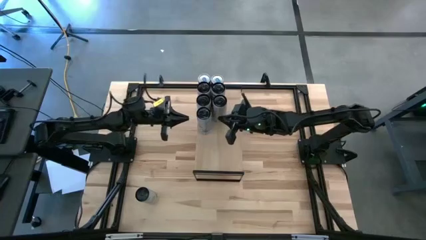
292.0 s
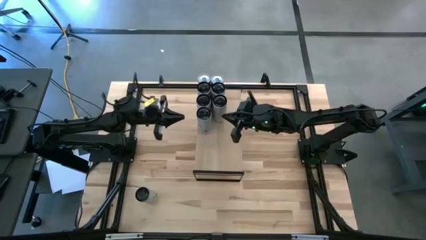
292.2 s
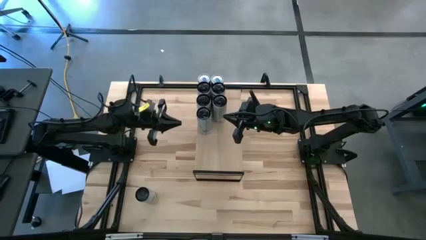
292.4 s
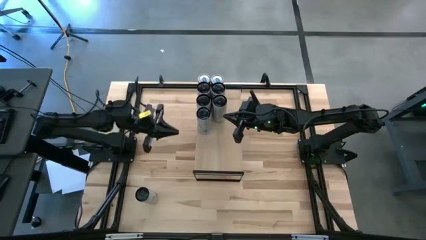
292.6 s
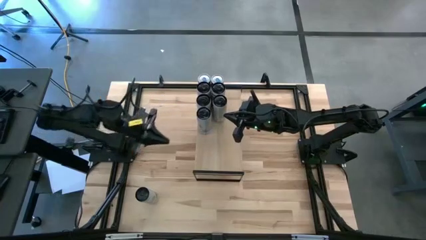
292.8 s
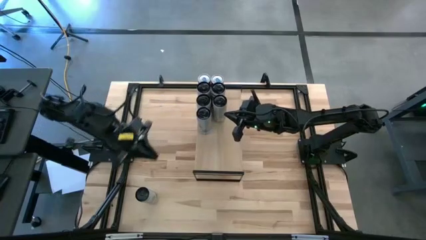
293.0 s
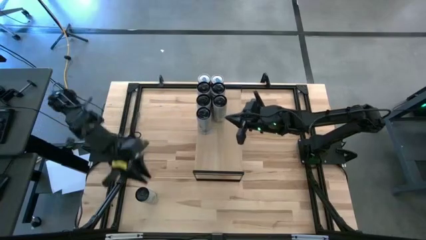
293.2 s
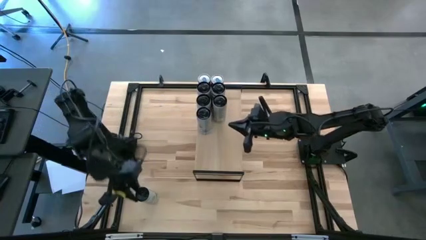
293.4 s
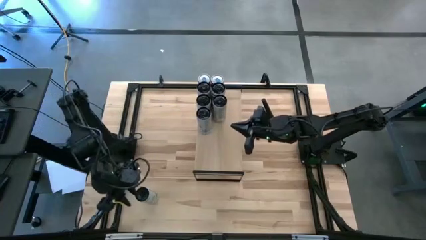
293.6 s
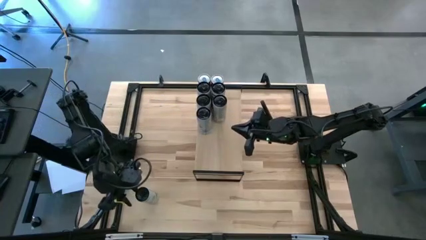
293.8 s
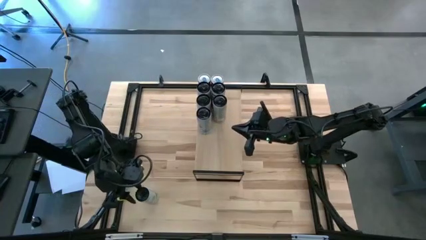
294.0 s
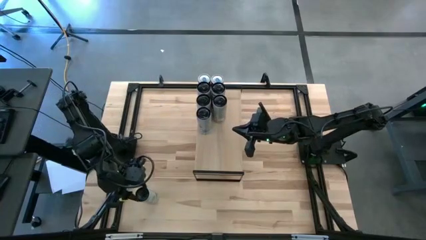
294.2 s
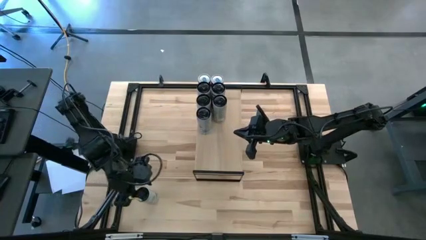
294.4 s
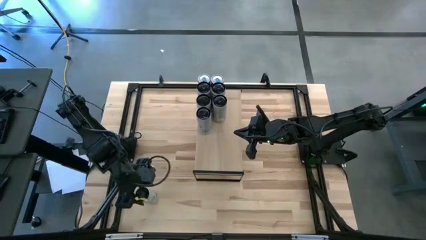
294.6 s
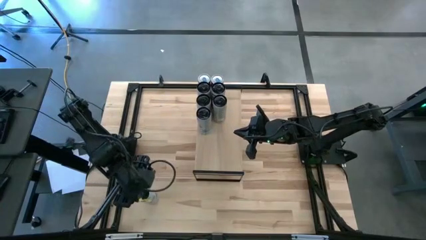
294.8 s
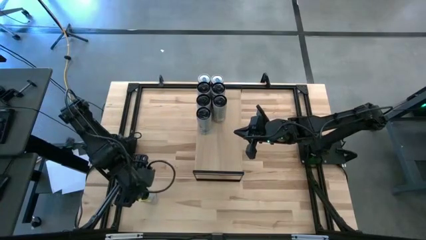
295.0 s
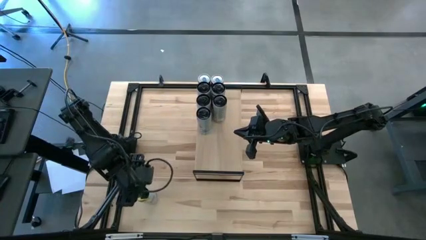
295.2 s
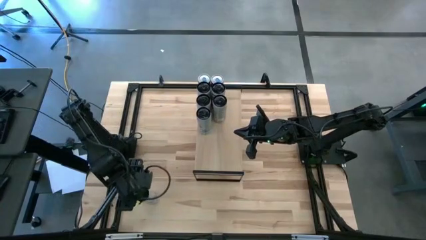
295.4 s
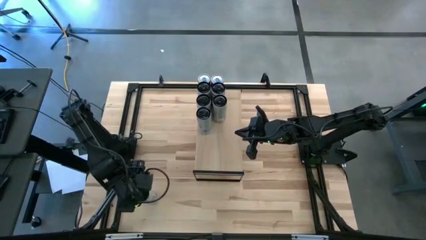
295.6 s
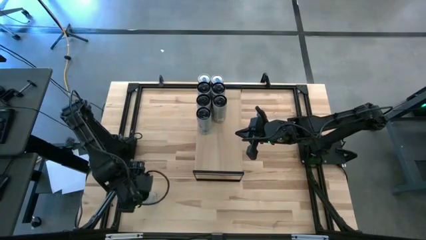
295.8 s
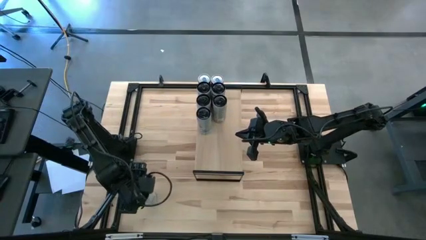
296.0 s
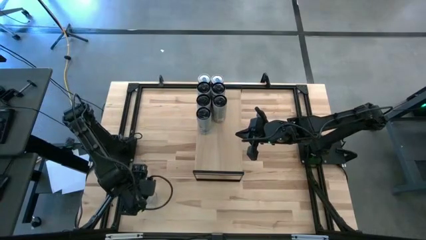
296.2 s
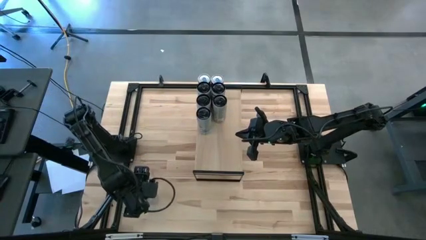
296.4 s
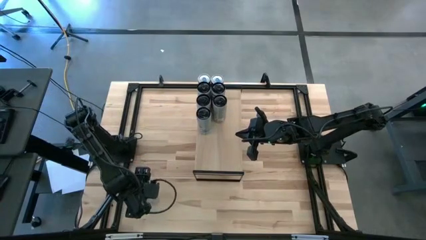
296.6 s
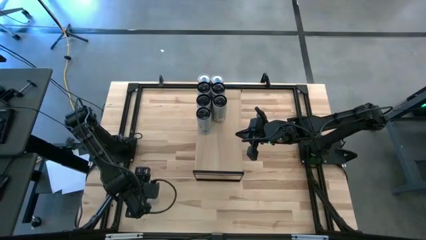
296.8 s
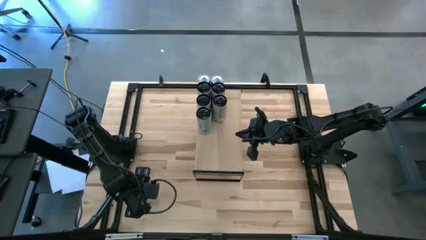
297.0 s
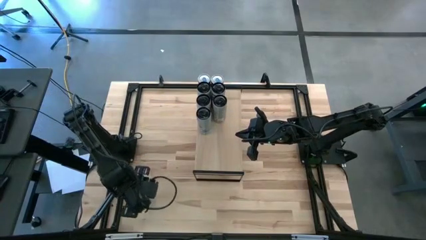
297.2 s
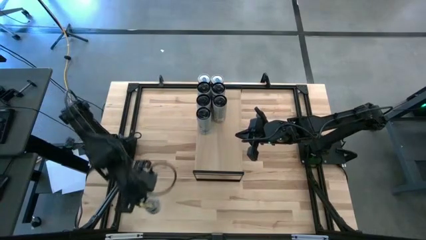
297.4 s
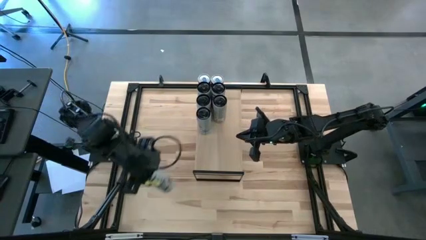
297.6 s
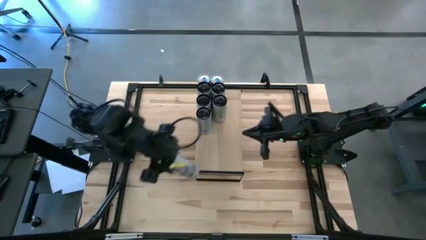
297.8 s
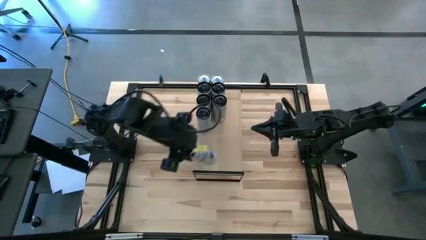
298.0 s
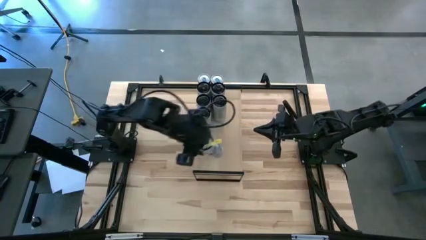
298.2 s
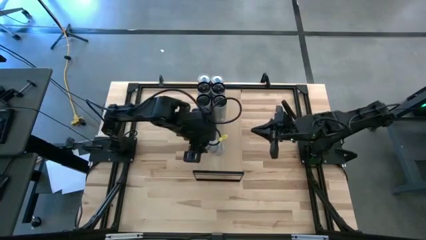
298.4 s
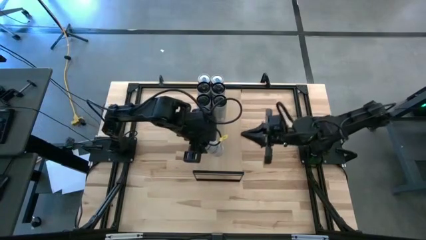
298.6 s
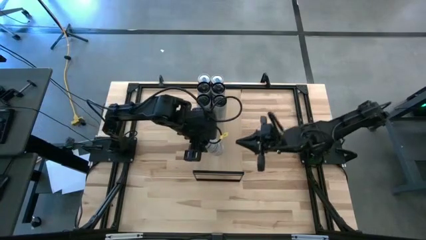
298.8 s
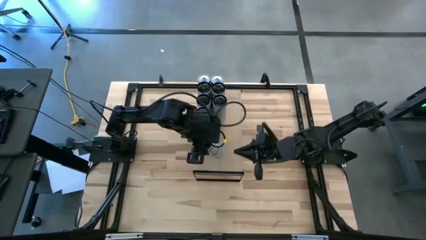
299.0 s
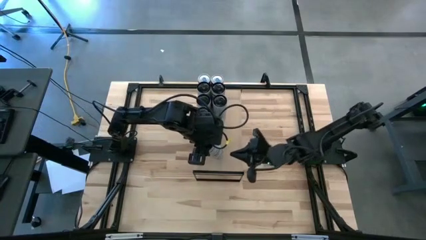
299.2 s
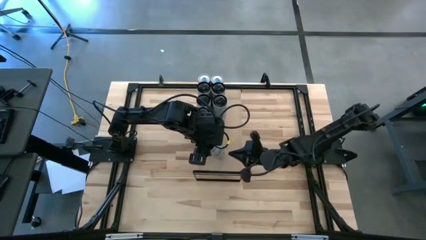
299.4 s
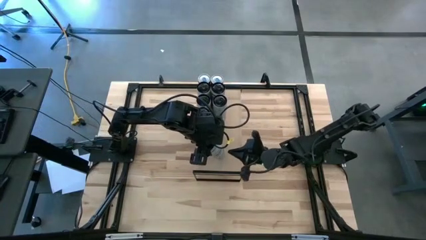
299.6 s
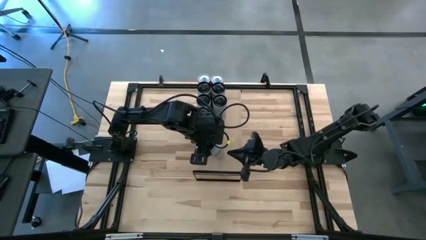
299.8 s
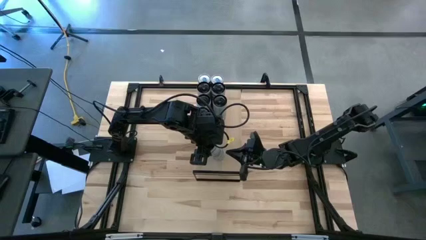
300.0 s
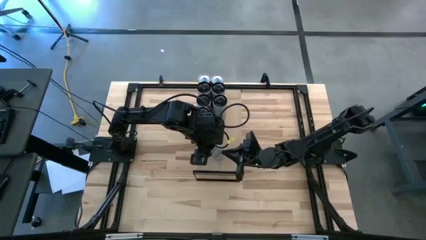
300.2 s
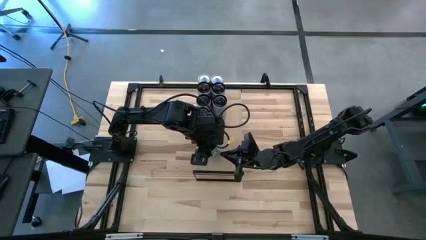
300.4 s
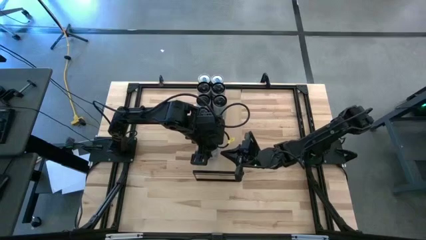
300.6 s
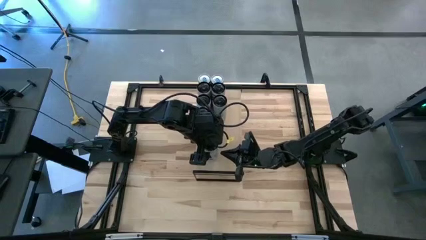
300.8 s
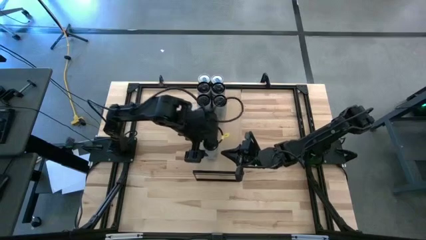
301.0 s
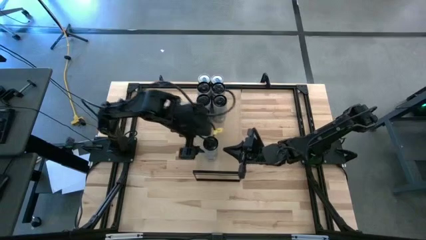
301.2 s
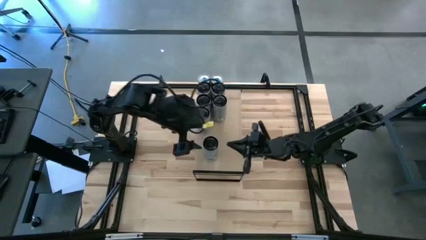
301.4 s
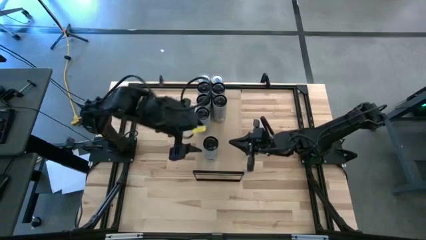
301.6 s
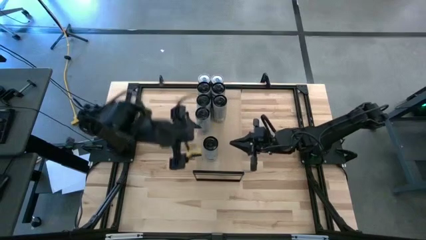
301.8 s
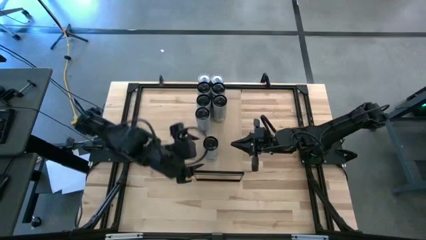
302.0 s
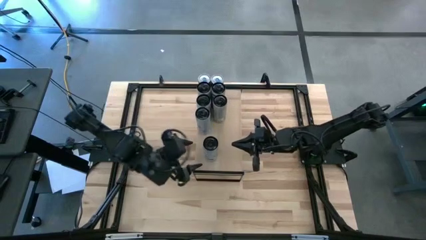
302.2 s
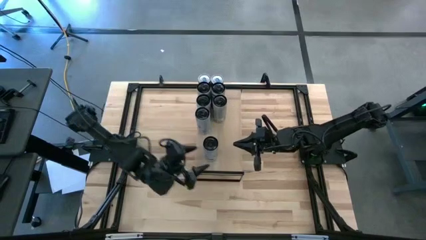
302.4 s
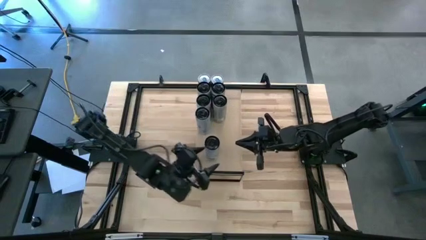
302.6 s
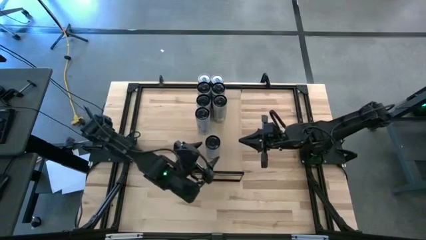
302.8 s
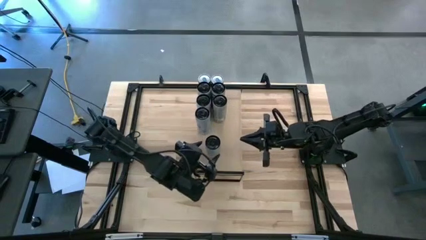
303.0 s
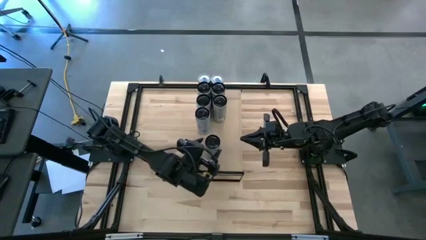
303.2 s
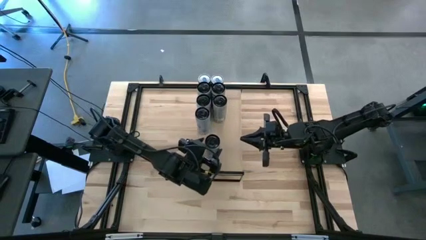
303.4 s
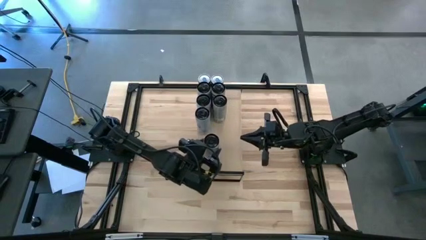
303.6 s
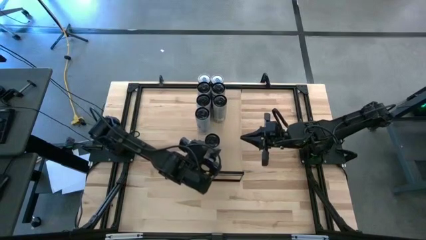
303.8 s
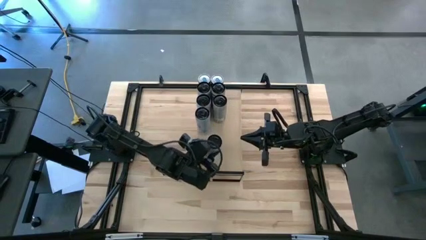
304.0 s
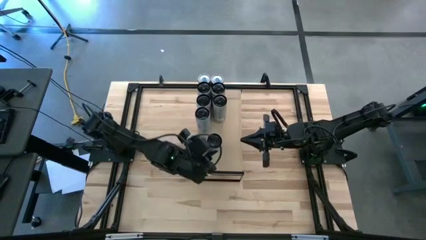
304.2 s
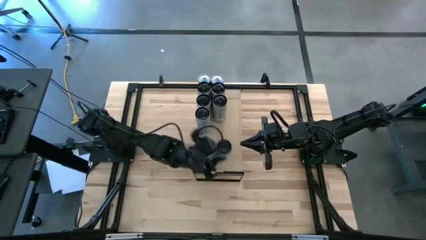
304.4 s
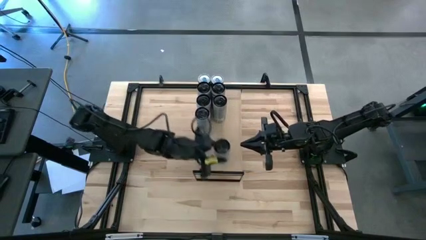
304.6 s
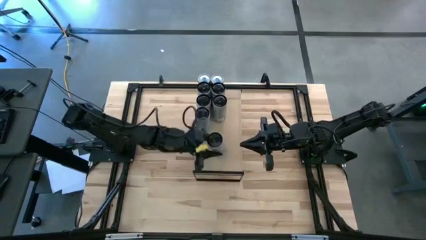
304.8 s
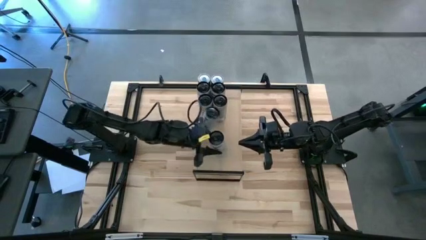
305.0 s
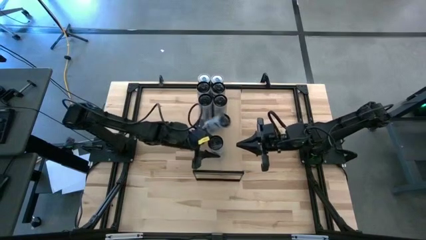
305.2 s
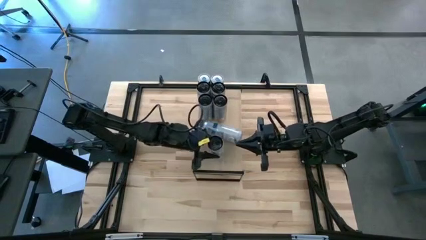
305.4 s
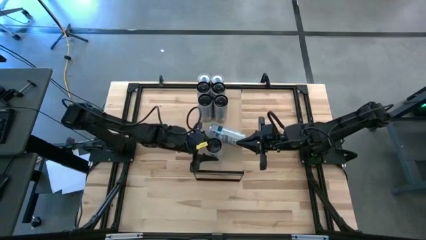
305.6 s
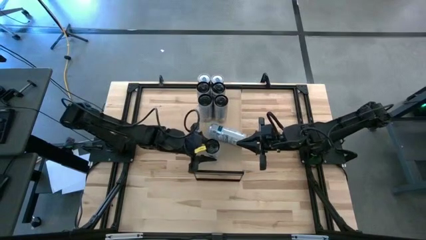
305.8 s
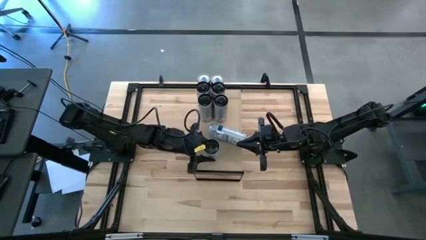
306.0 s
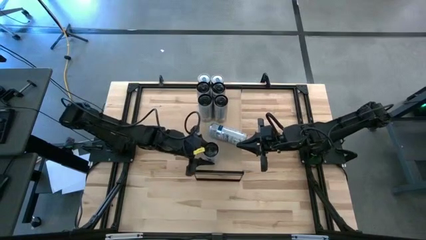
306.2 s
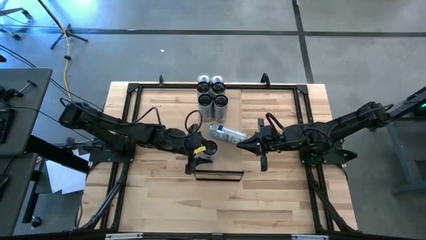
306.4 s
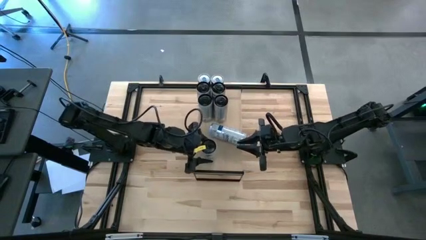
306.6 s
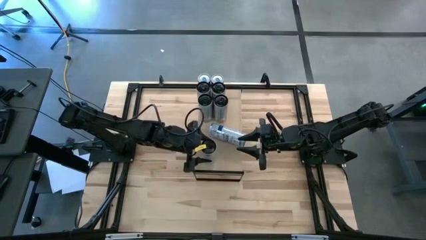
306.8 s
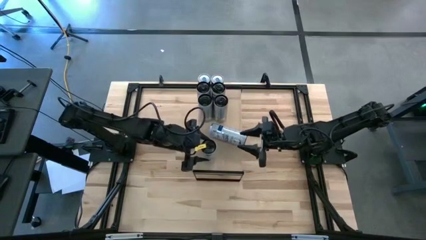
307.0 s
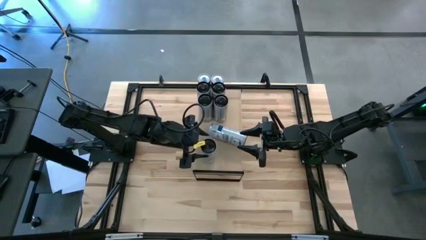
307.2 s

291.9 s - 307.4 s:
Task: Place canned beverage on shelf
Put the white blue soda can on the shelf aligned with the other white blue soda can
